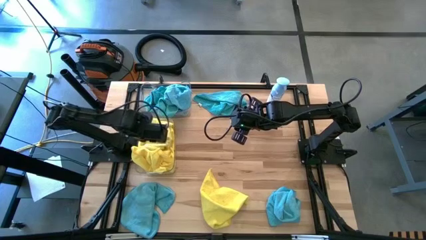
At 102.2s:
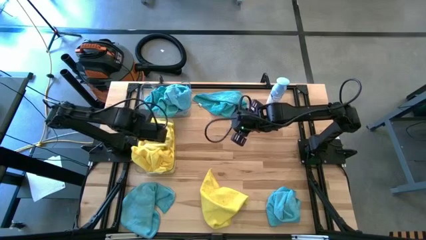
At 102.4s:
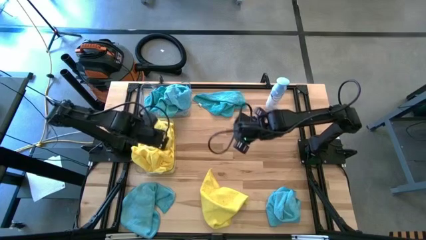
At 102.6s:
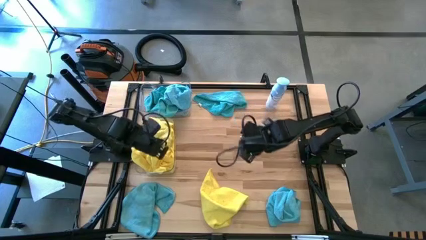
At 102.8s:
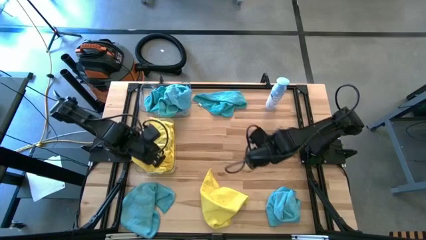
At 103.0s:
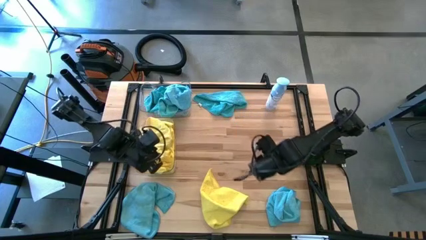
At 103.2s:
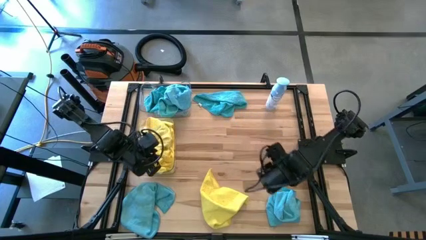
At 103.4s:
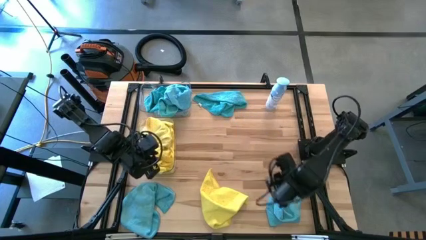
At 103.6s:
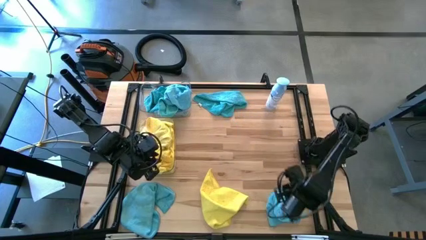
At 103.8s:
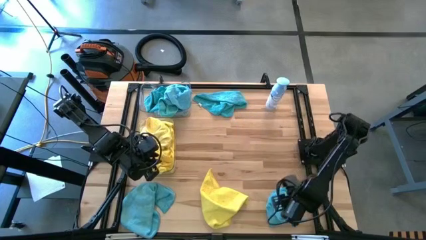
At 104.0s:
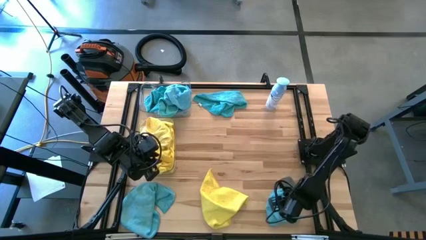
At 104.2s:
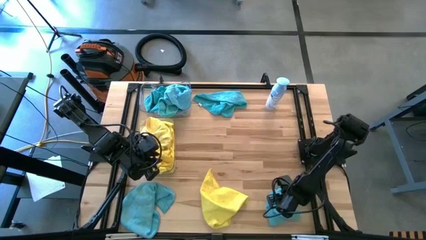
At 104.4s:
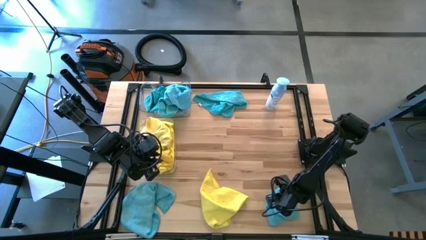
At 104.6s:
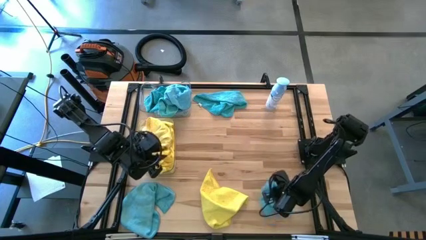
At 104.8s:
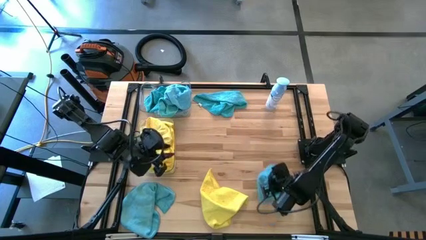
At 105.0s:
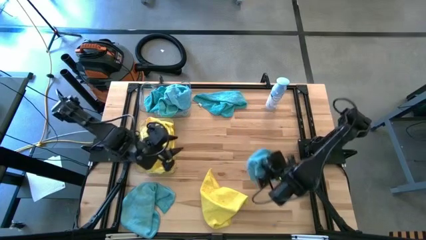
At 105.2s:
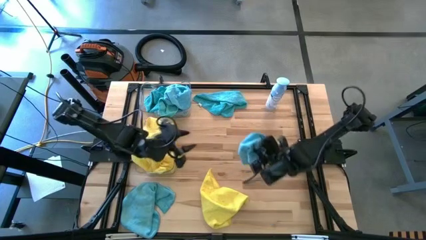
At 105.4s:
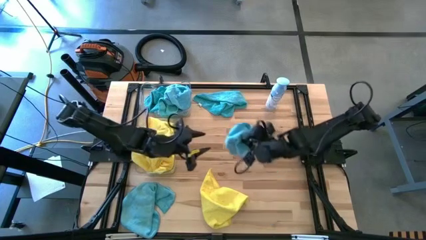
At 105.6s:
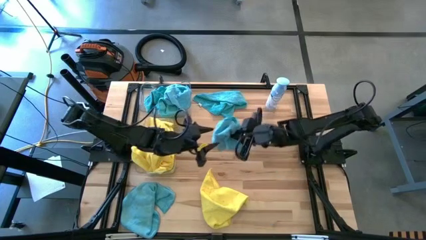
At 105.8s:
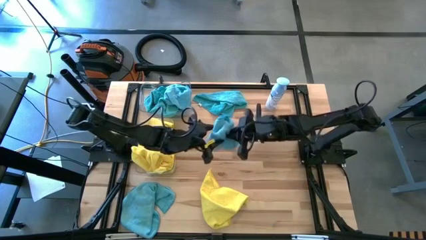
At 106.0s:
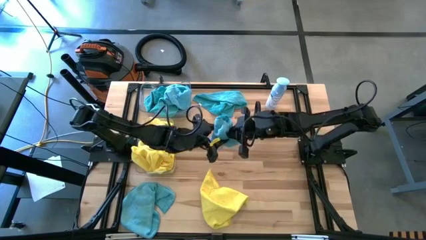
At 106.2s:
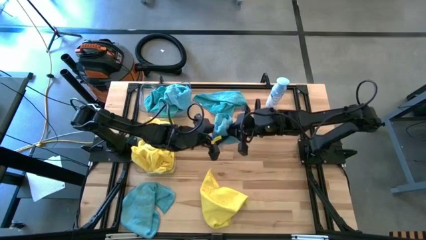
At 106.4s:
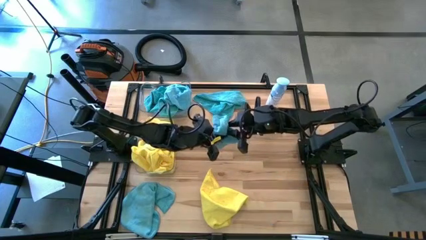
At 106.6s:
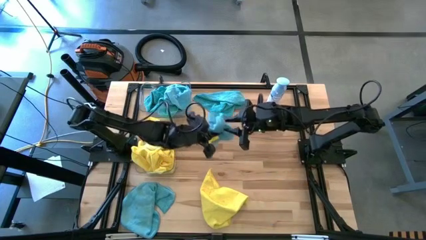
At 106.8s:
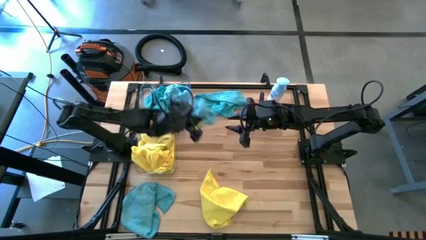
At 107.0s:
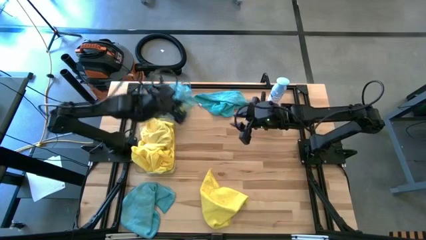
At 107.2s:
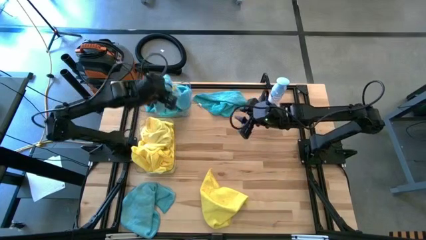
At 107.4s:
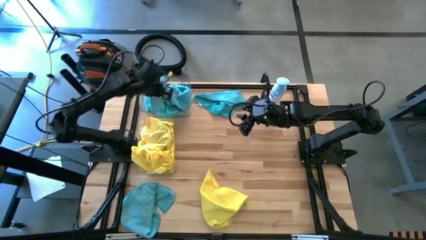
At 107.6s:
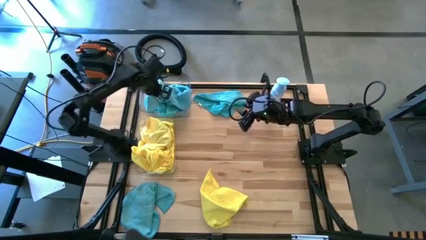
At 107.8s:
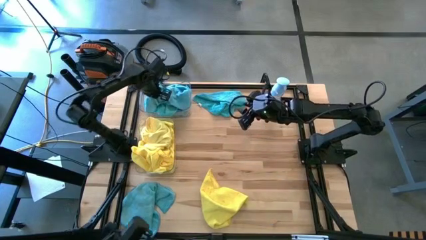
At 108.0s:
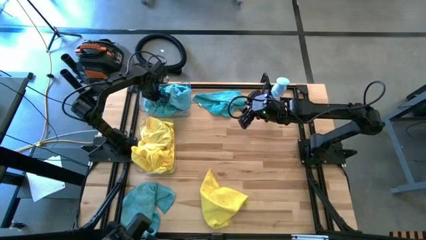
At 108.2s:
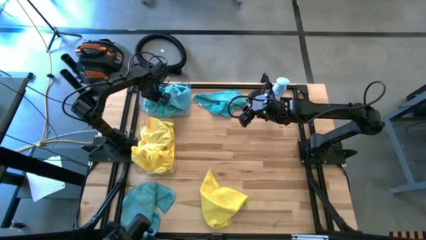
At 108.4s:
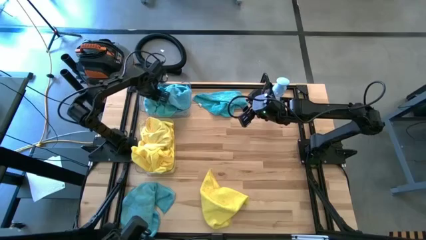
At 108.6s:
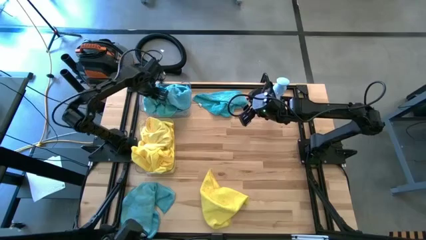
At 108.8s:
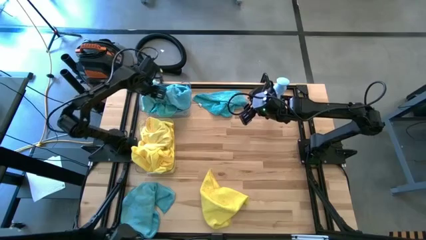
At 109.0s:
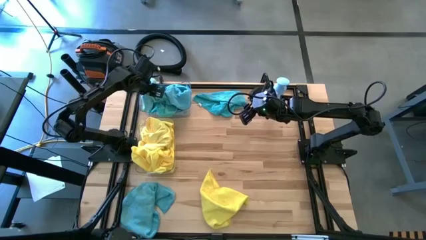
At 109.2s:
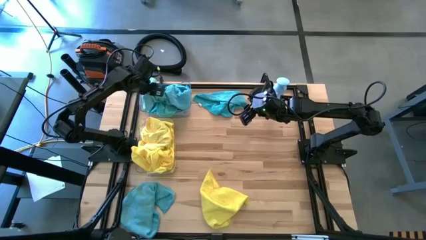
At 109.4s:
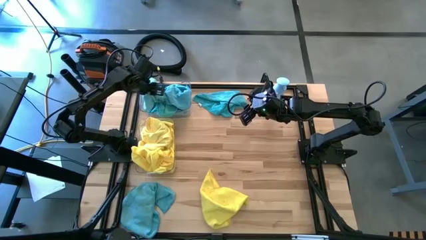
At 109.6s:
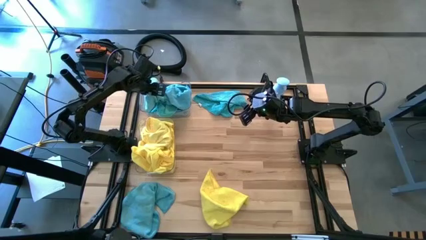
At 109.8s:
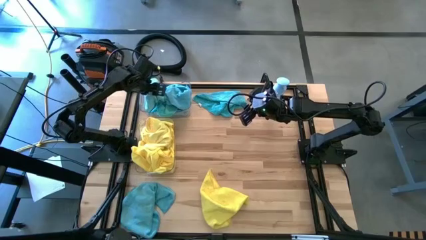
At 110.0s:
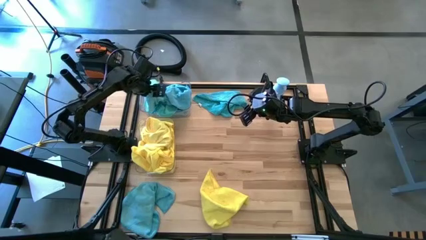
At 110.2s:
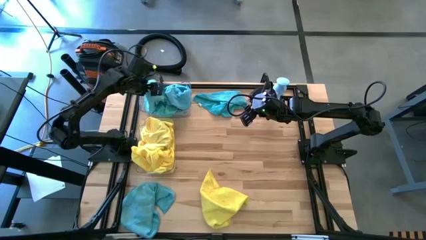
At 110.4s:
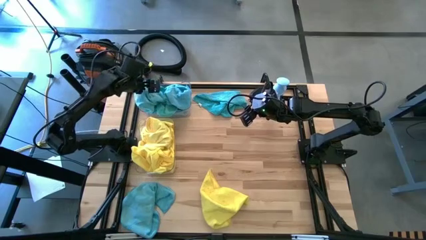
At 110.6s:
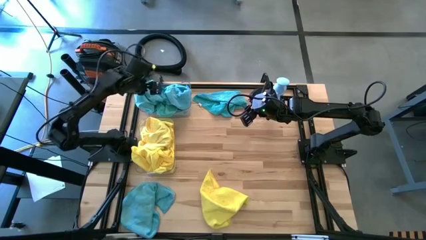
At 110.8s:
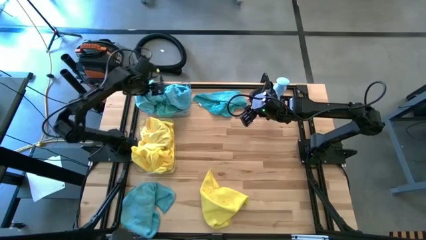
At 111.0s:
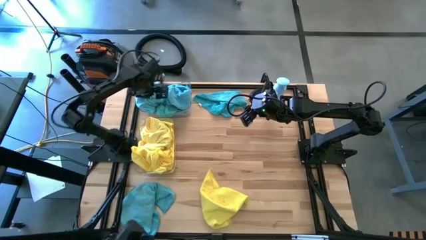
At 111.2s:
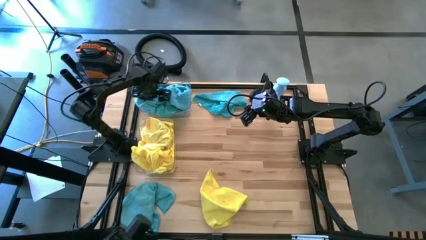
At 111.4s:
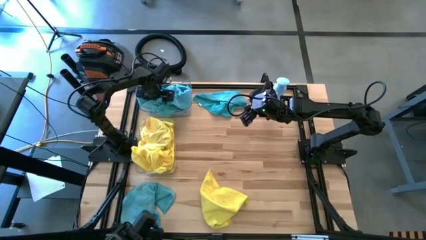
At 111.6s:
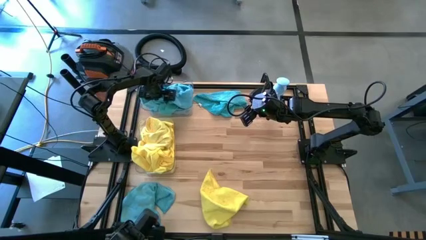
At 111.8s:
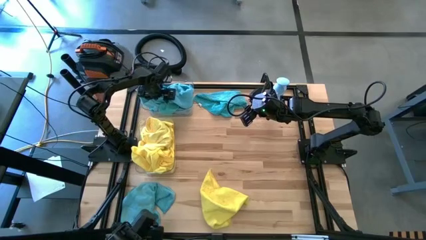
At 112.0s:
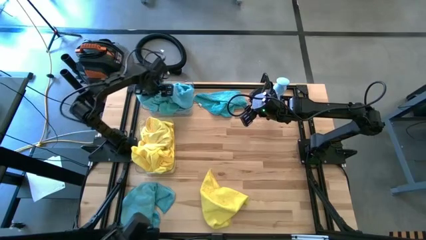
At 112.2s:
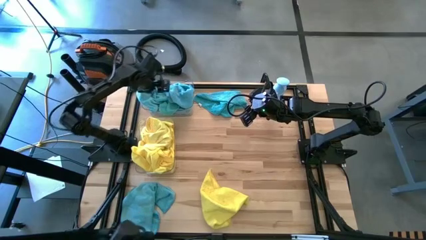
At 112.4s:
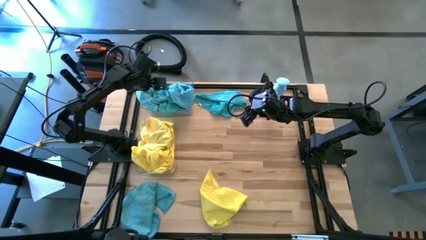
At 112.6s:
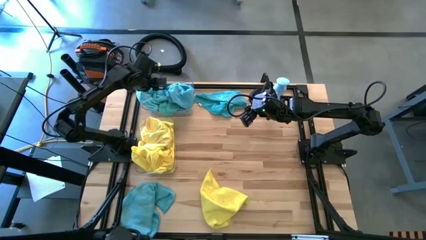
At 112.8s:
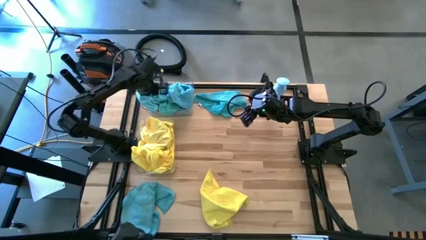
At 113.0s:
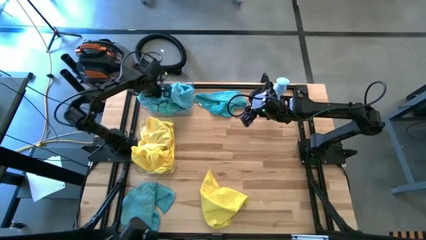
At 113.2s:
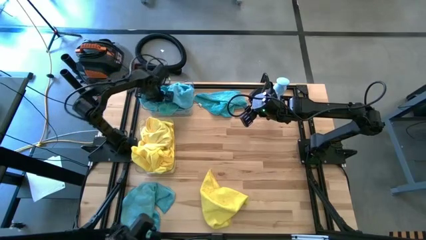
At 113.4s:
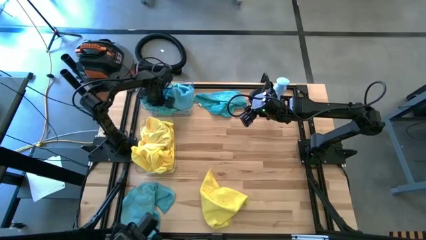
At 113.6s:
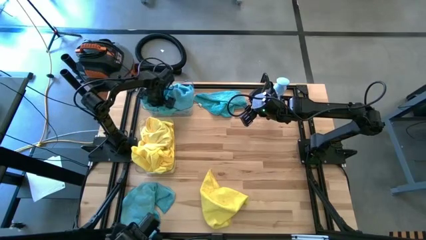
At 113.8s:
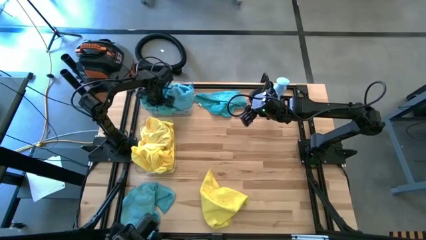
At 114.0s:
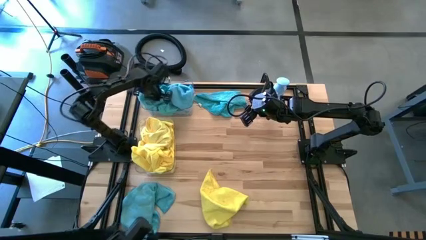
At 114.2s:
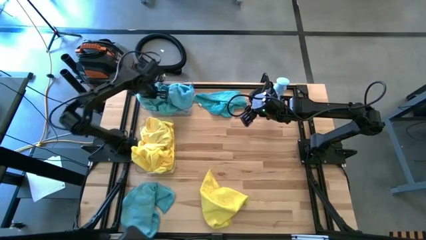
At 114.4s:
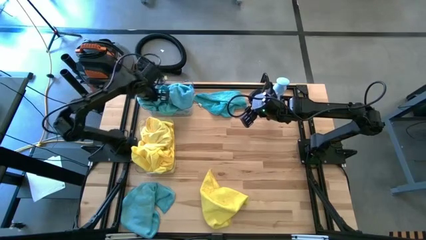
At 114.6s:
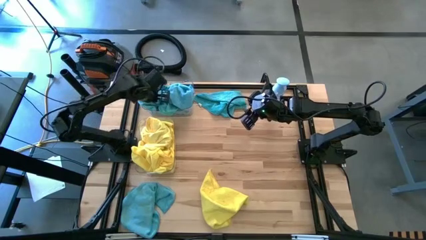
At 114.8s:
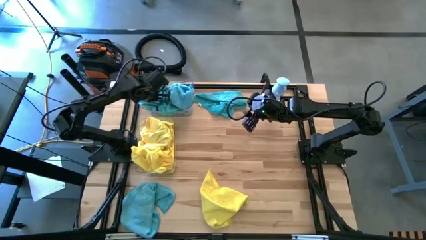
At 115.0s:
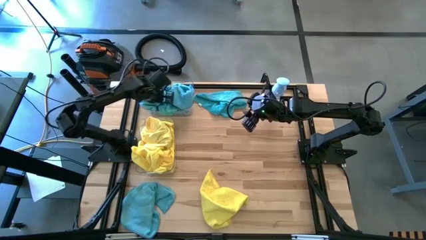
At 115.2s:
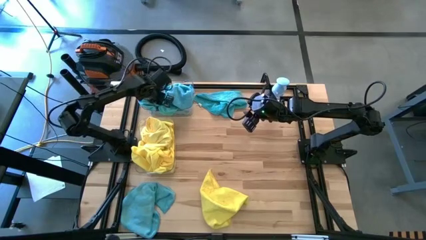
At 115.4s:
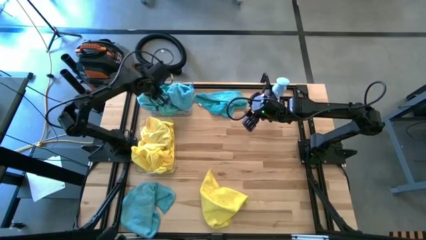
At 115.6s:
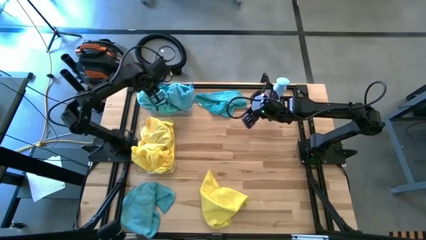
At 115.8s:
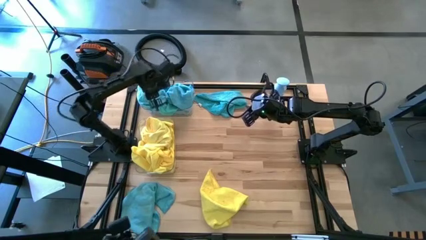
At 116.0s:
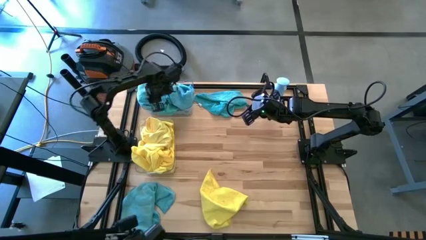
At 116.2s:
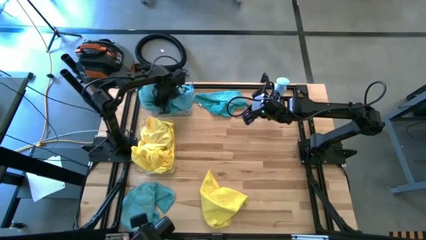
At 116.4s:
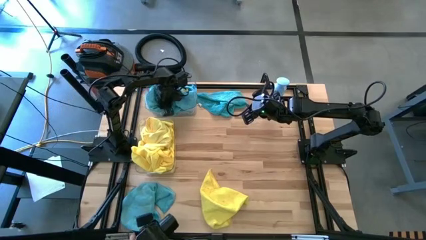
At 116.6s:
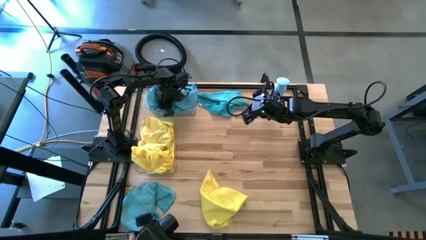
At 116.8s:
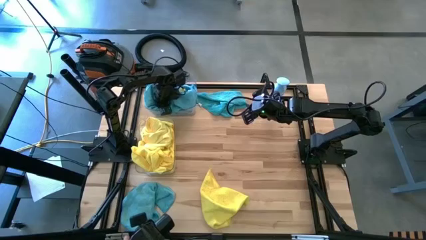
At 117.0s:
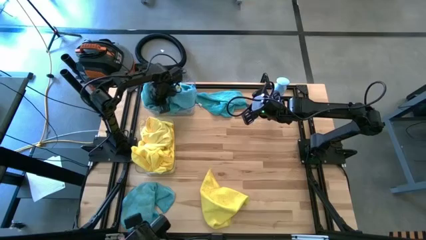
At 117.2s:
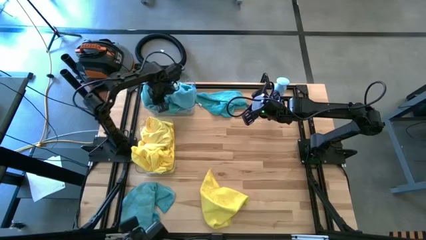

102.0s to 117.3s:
Task: Sort microfiber towel by color & place in baskets
Put the blue towel into the top transparent bin

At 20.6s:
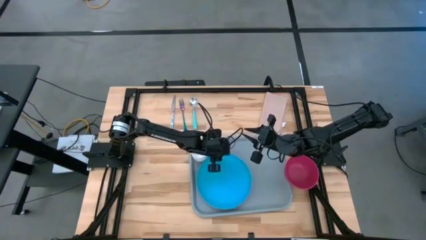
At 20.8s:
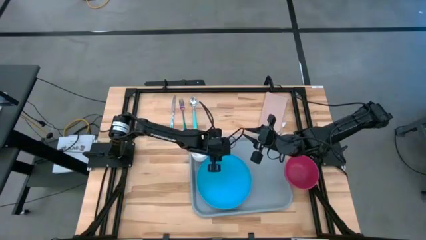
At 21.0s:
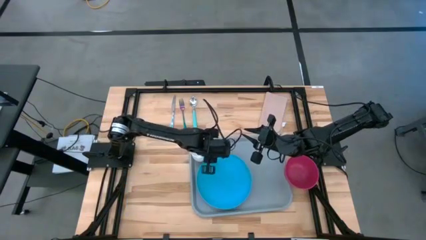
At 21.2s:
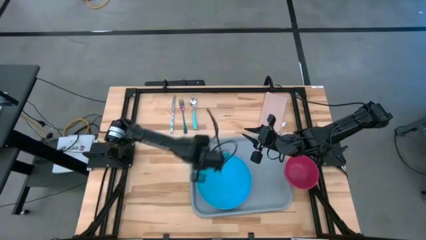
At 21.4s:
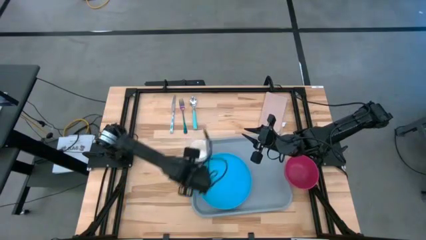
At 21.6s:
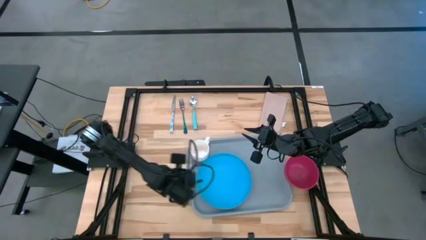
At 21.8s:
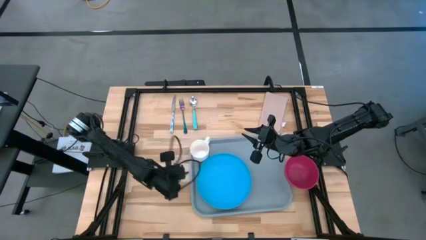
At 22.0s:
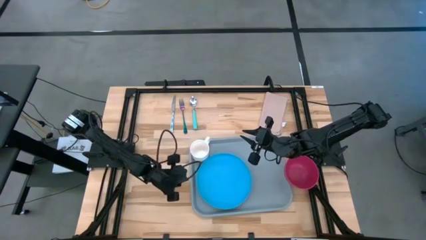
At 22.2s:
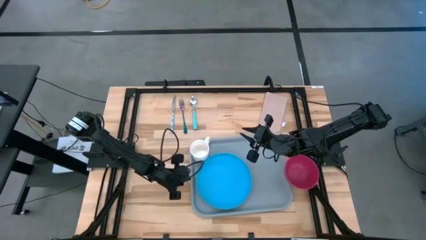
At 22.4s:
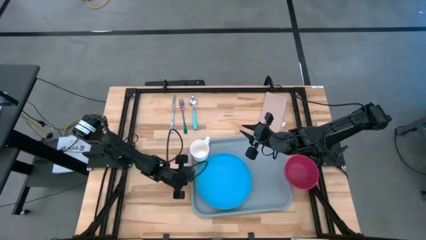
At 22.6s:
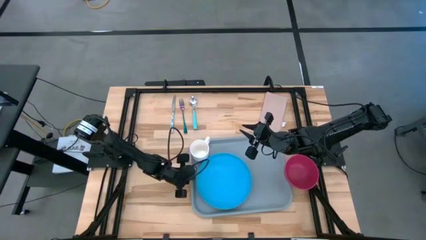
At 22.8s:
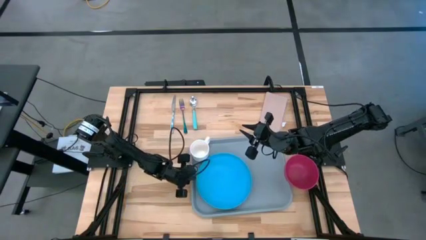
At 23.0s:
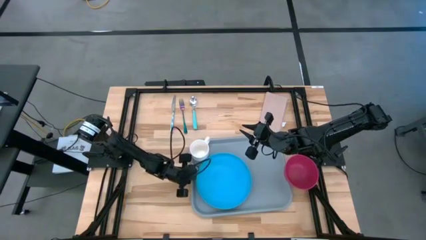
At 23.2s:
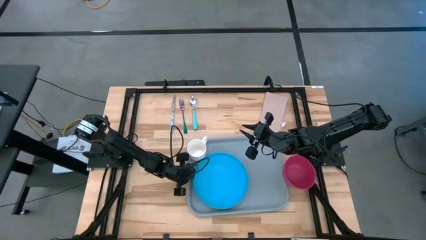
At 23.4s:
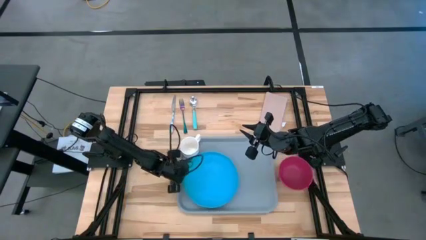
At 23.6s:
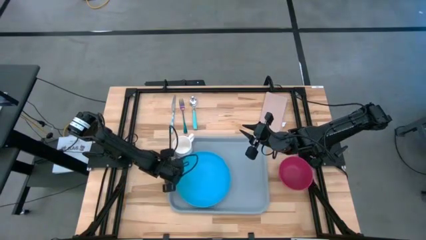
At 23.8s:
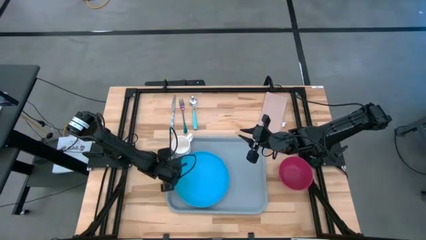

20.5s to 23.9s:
Task: Set up tray
Adjust the gray serving tray
